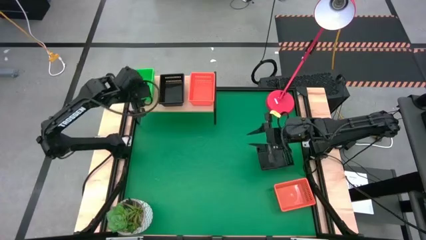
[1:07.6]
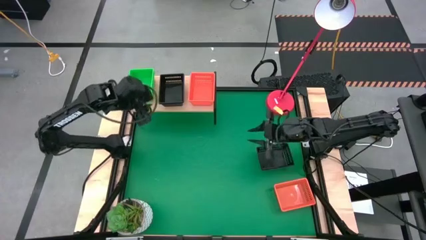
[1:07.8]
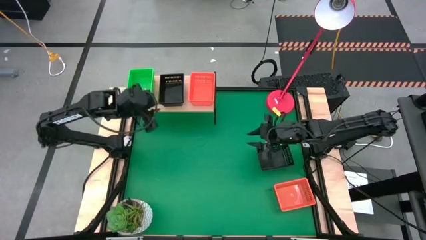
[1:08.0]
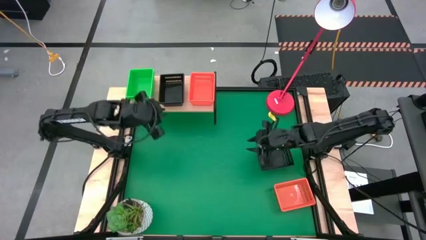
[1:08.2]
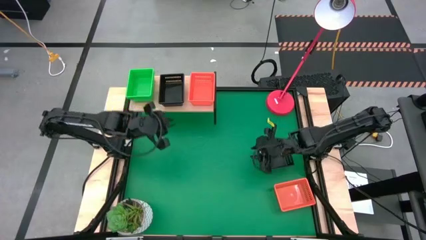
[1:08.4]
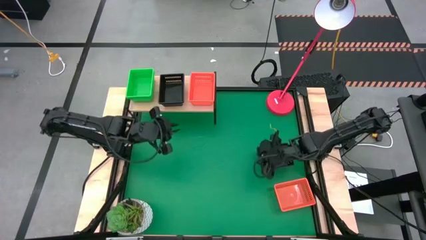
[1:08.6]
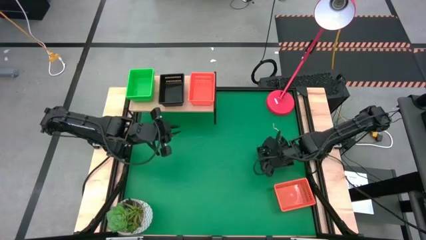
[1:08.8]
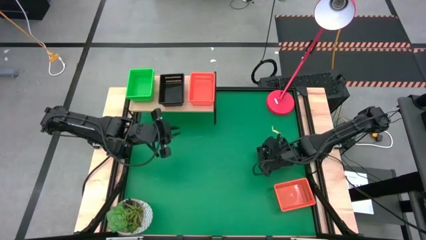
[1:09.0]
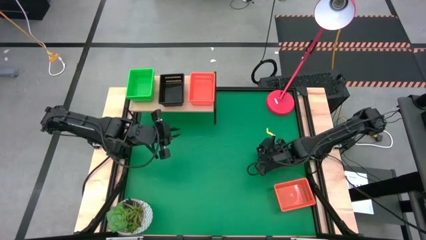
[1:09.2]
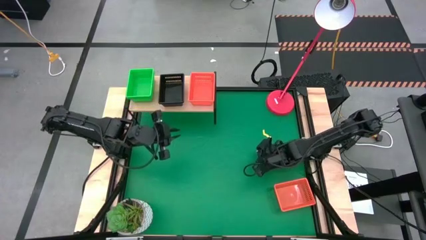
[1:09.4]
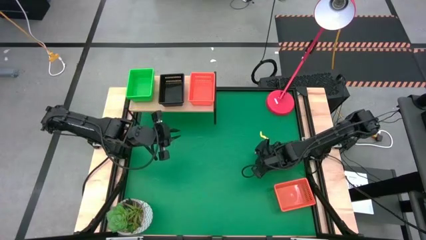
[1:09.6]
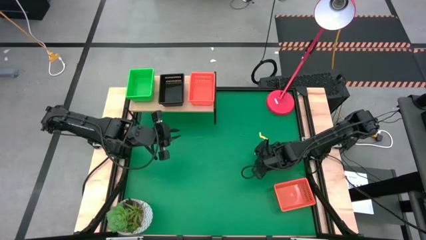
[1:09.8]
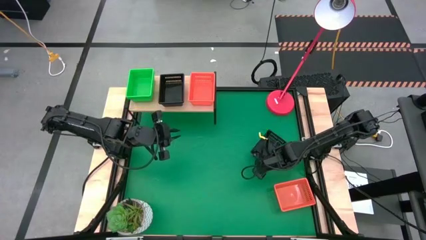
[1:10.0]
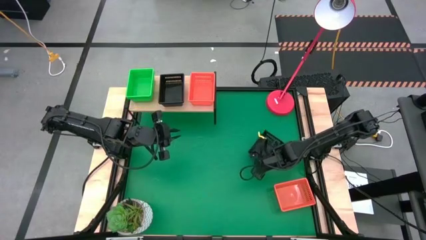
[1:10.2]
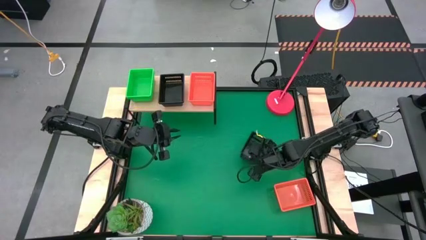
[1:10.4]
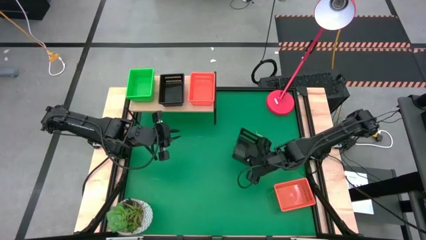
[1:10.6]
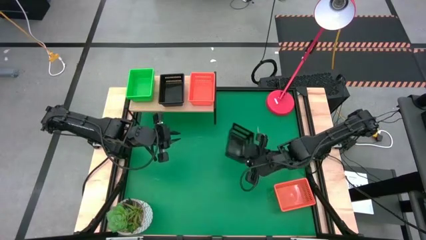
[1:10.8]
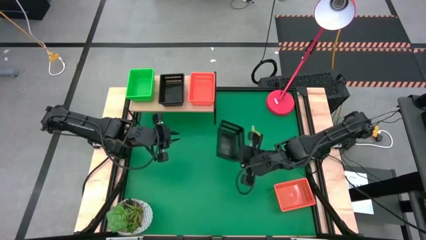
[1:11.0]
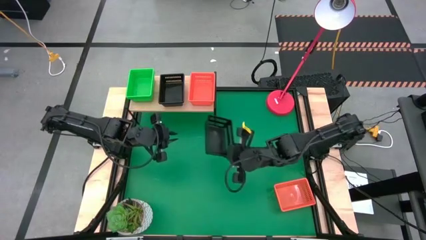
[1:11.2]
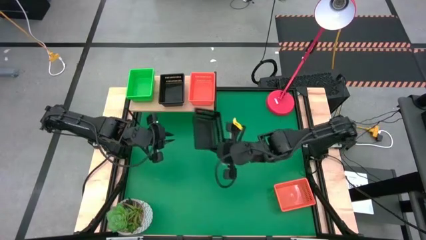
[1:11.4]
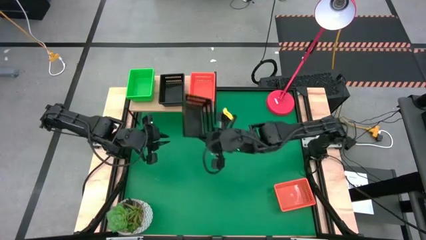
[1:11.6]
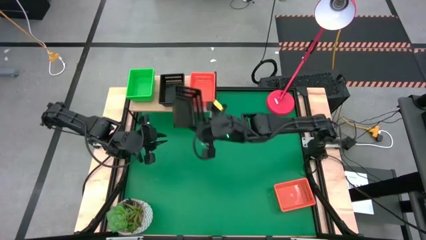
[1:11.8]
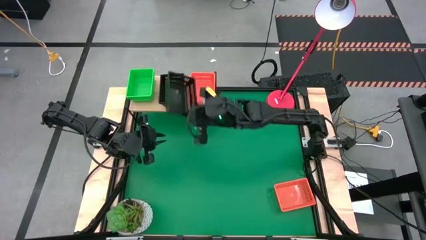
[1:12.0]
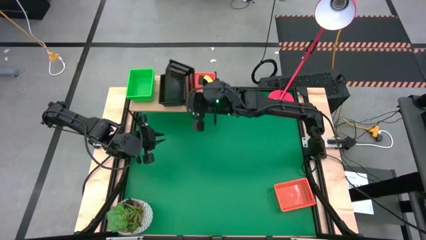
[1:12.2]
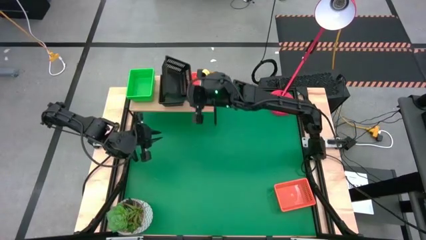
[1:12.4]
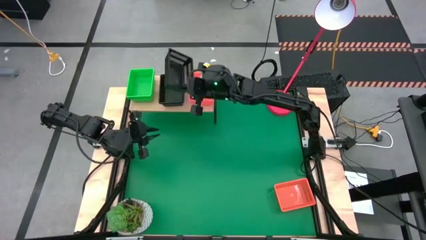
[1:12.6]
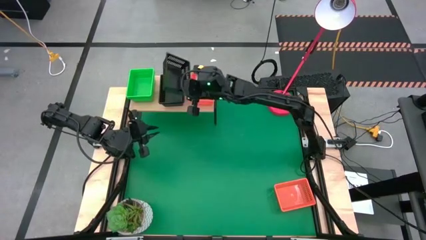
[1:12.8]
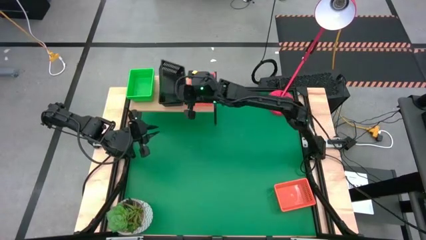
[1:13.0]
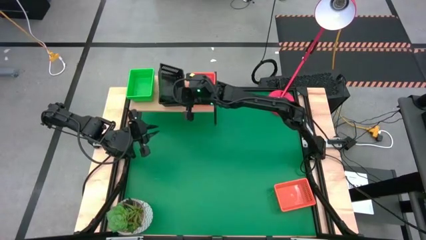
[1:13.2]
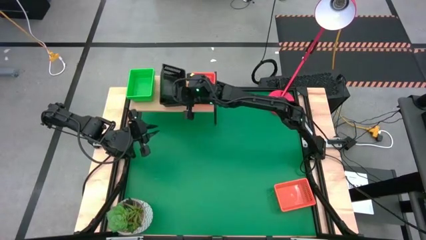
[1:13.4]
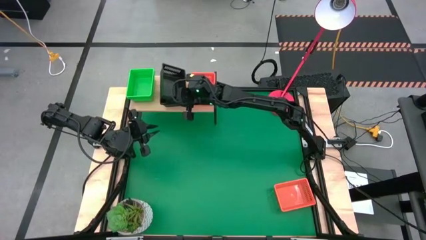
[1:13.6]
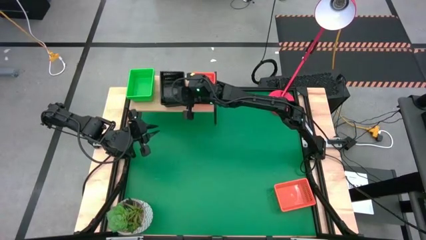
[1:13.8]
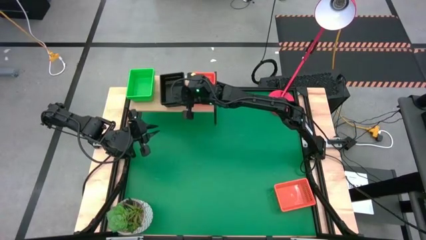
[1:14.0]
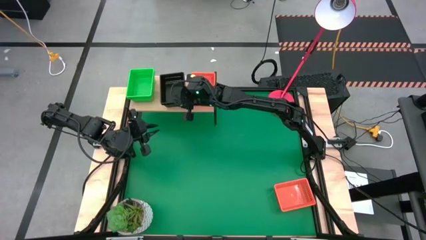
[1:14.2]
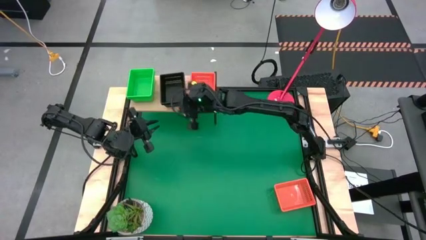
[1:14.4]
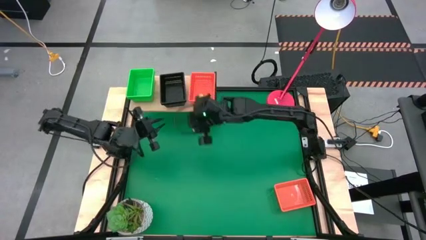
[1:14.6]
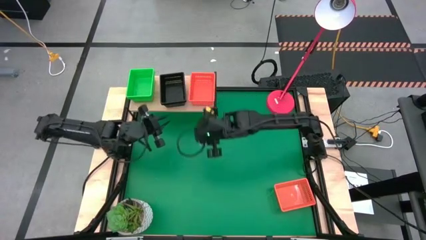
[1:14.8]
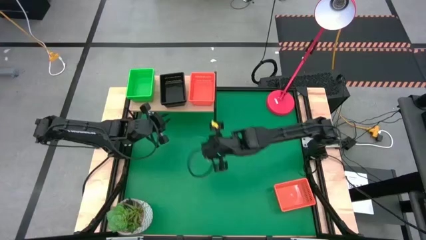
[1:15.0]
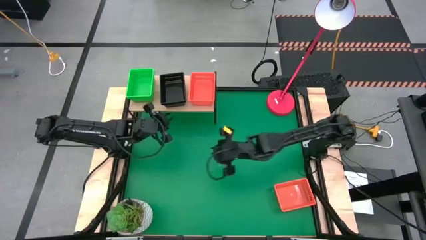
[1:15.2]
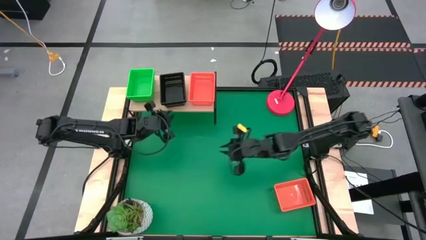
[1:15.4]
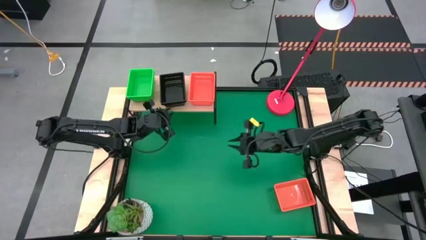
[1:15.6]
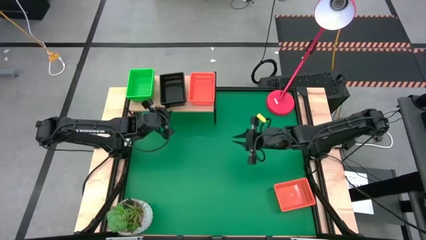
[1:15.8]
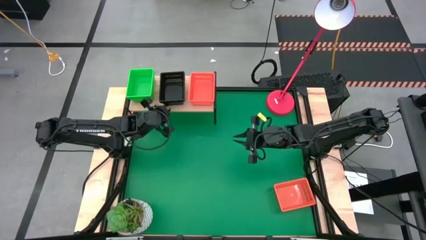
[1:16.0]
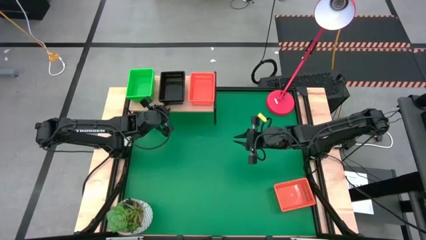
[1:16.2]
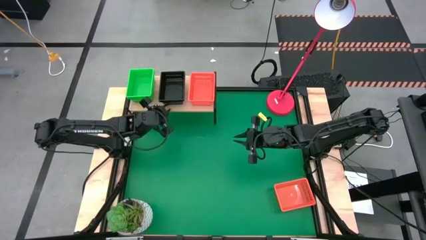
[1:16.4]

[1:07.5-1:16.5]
Task: Stack baskets on shelf by color
Stack the black basket on top of the other black baskets on the shelf

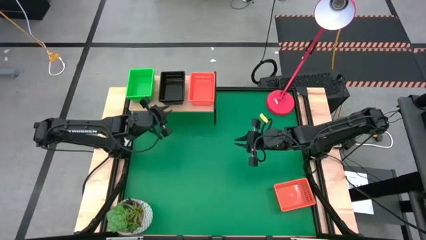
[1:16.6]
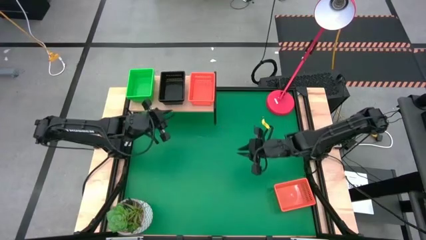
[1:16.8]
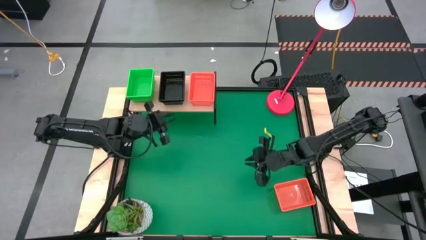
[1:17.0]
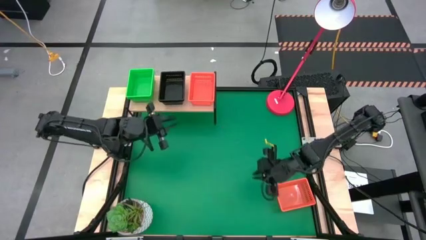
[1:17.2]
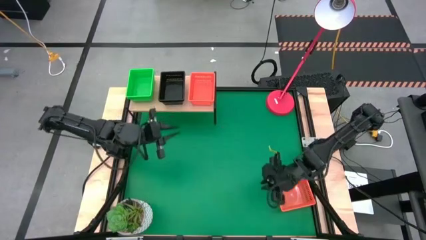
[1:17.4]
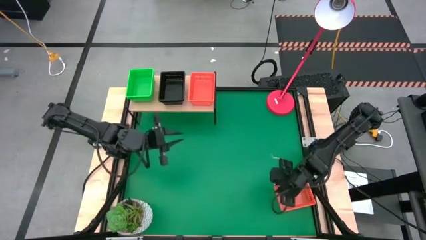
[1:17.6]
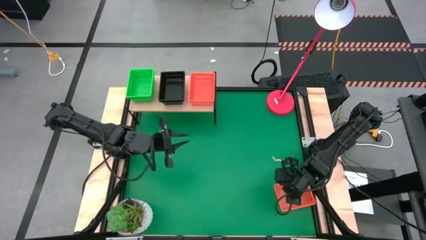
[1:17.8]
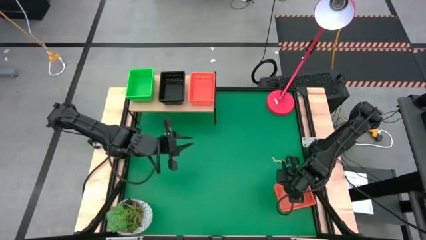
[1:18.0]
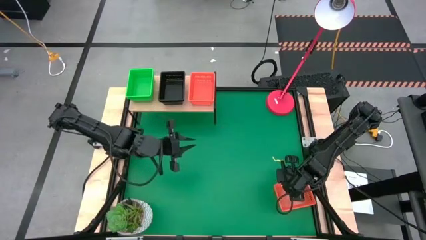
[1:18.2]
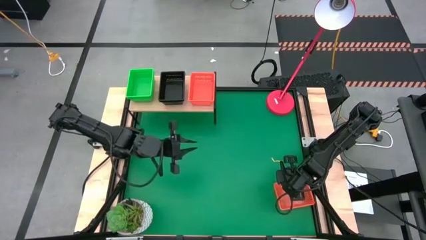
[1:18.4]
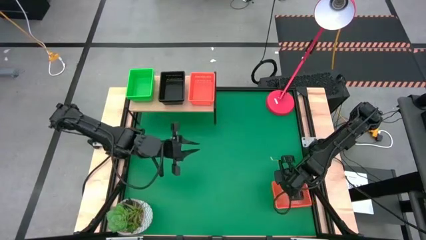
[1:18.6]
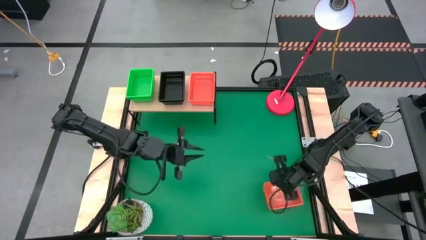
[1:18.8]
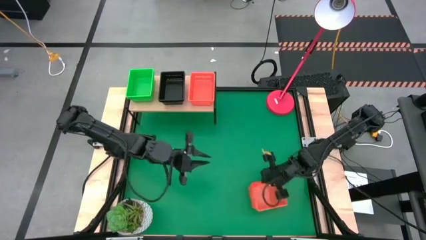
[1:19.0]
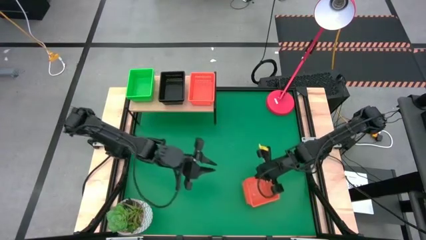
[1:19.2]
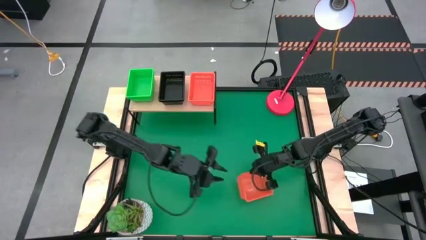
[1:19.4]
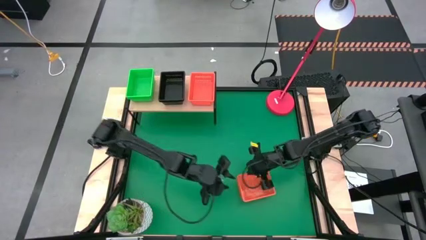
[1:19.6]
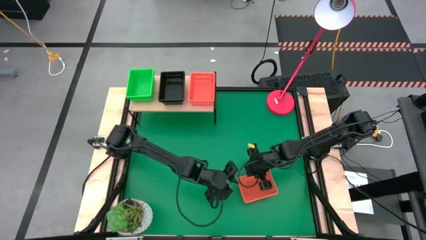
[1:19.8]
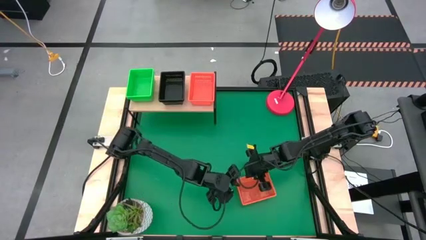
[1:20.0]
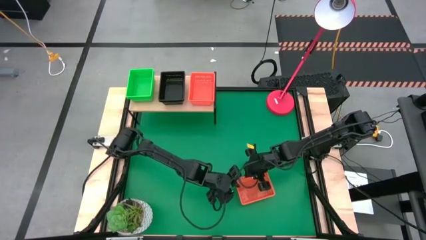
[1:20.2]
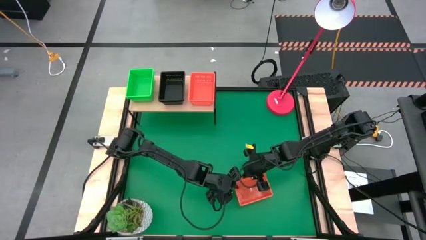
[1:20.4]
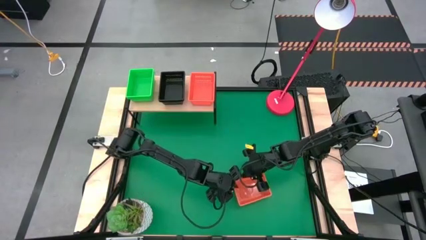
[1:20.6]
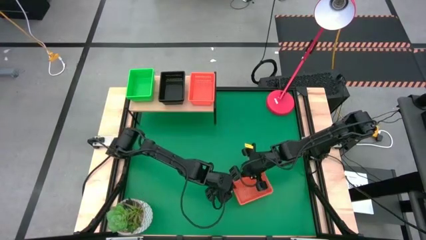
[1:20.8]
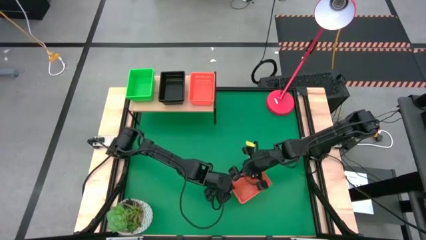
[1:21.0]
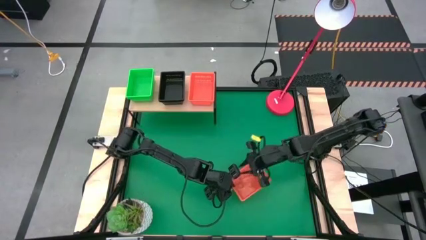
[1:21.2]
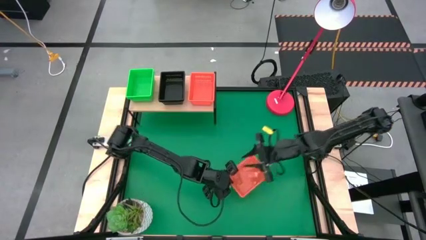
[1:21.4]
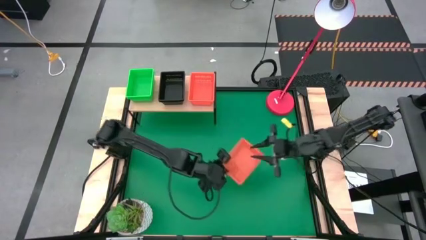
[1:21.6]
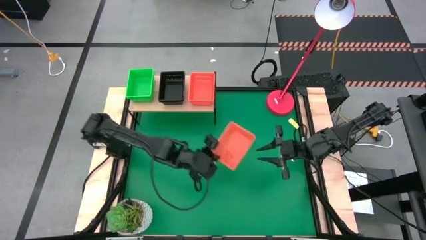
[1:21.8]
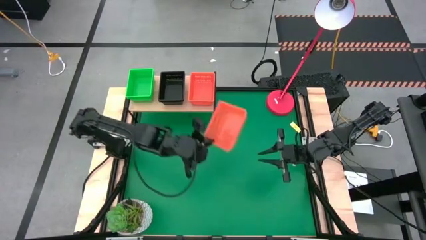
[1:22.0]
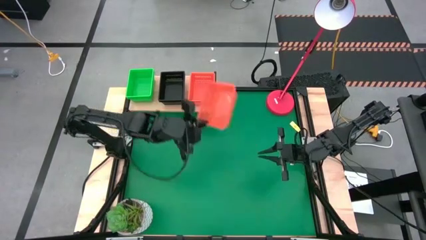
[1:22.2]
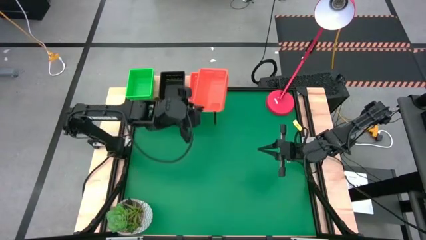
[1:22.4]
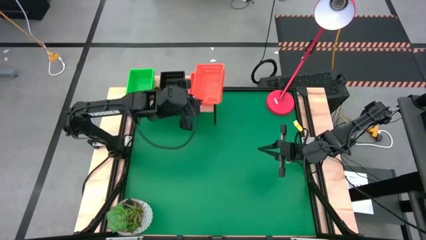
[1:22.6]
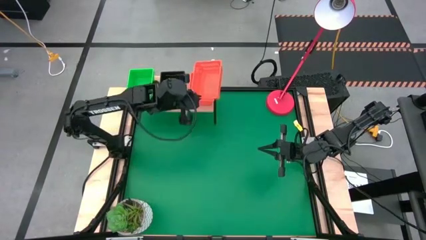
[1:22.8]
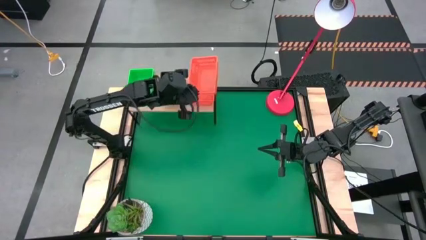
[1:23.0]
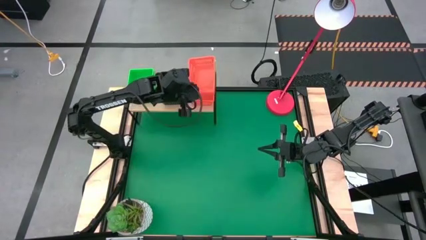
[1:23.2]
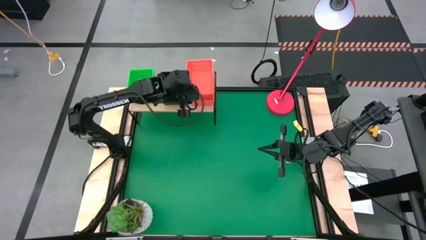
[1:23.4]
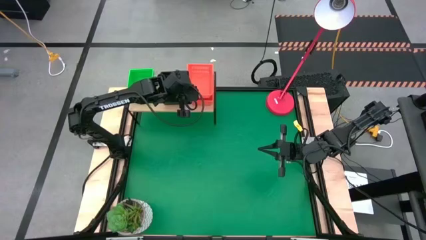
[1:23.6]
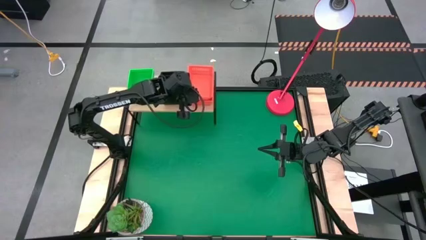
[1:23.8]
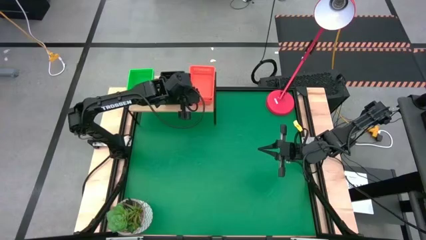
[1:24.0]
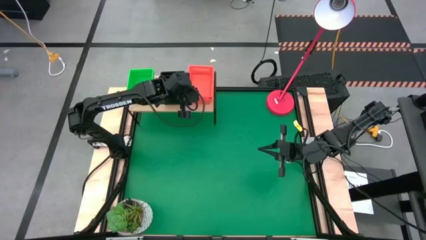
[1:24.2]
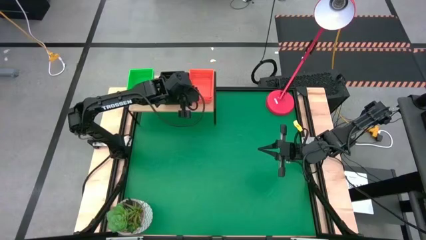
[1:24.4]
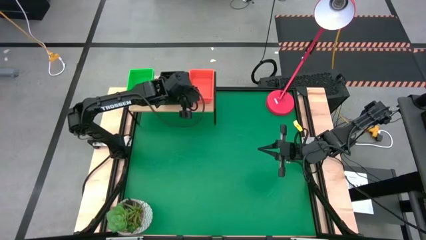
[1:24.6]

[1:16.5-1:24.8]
Stack the orange basket on top of the other orange baskets on the shelf

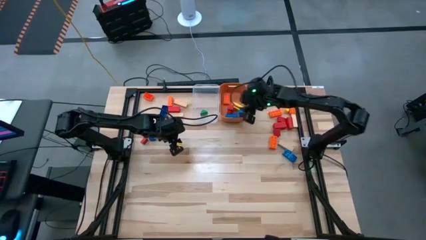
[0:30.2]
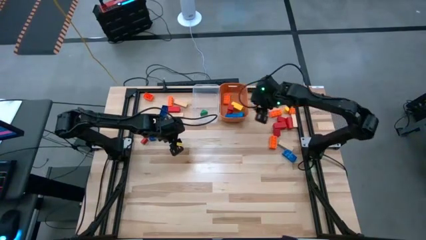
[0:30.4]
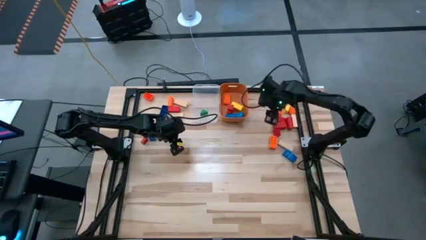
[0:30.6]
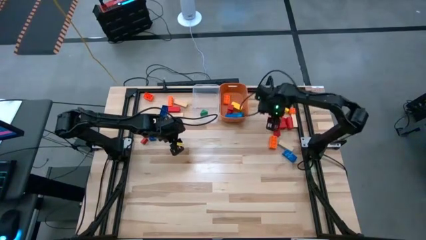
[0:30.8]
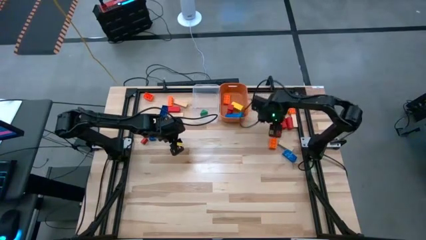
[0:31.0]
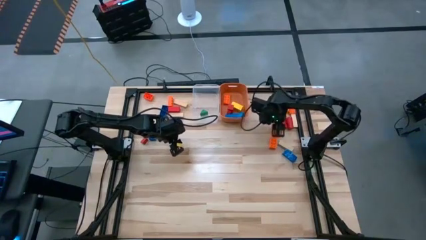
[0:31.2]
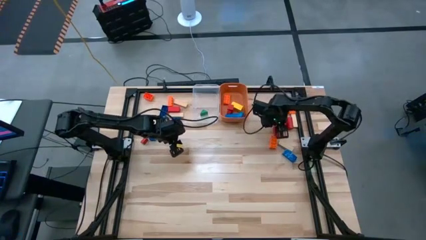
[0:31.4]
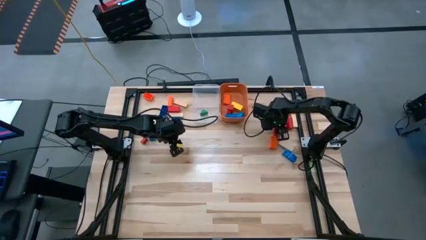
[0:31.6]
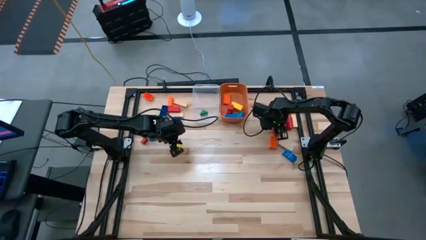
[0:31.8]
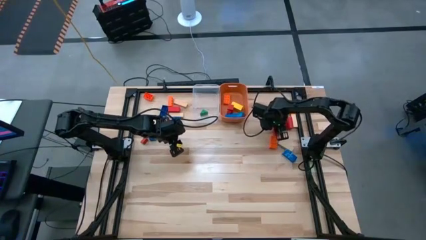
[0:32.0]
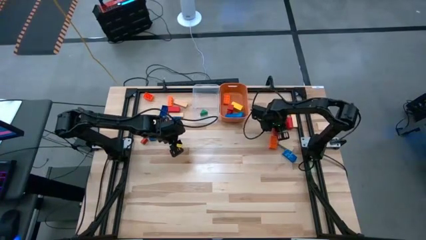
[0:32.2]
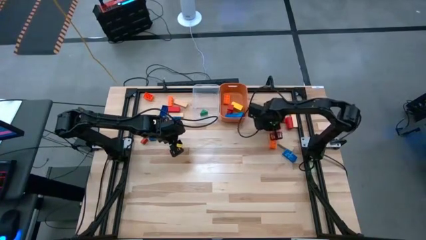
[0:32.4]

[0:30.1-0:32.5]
Task: Sort blocks by size
Put the red rectangle block into the orange bin
